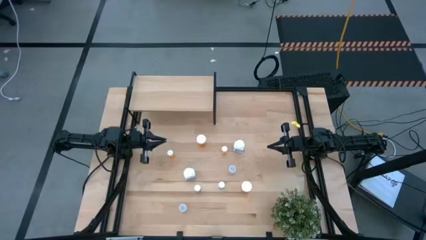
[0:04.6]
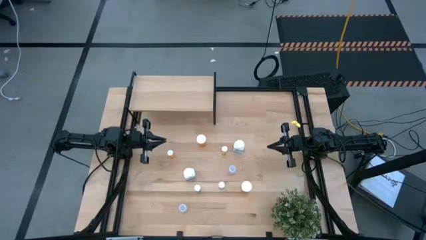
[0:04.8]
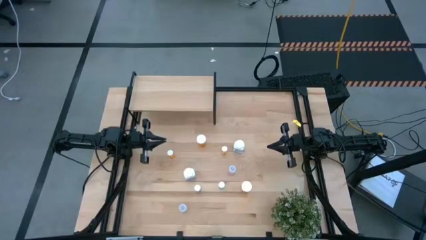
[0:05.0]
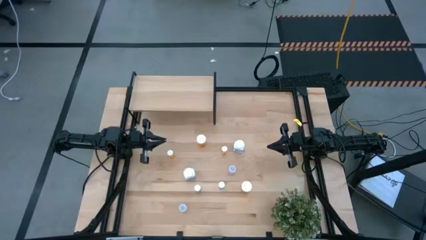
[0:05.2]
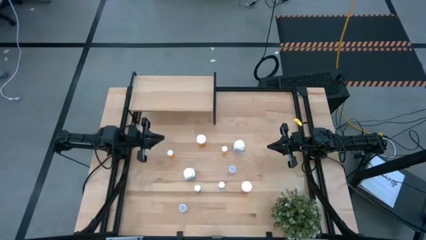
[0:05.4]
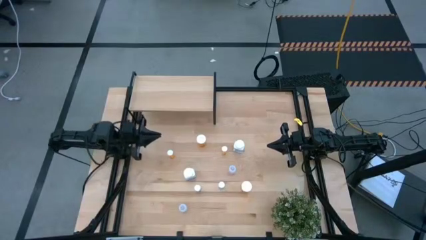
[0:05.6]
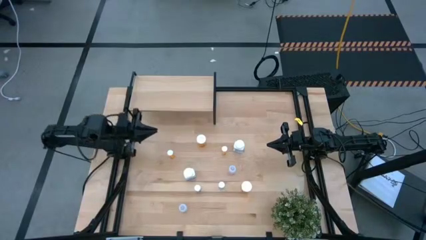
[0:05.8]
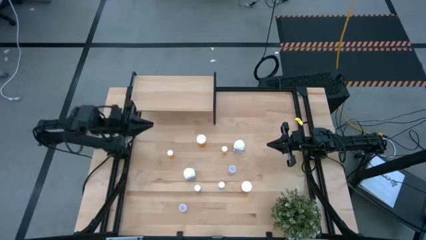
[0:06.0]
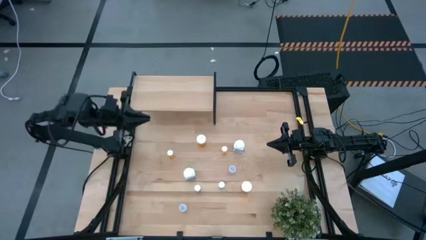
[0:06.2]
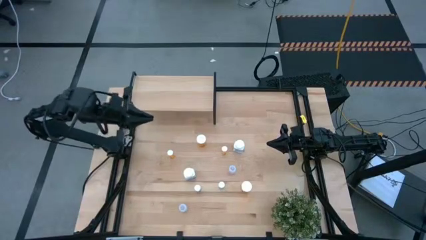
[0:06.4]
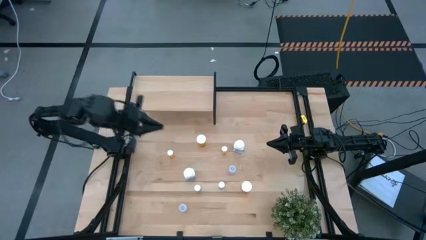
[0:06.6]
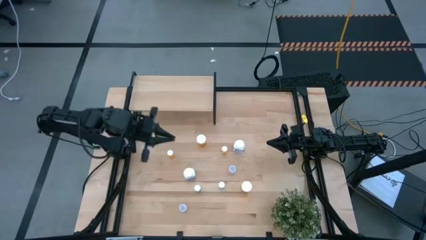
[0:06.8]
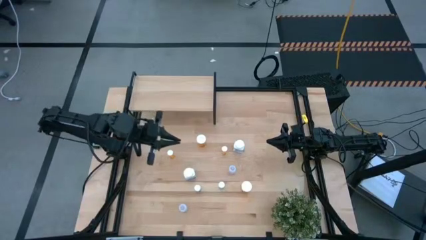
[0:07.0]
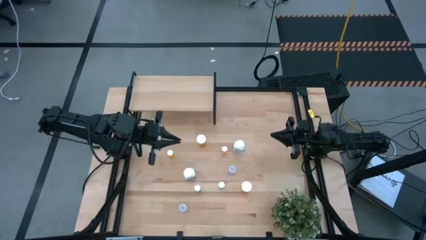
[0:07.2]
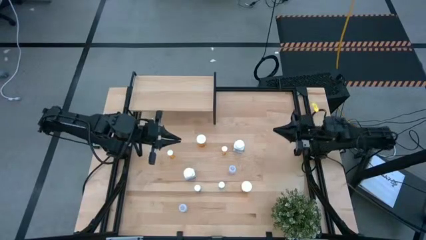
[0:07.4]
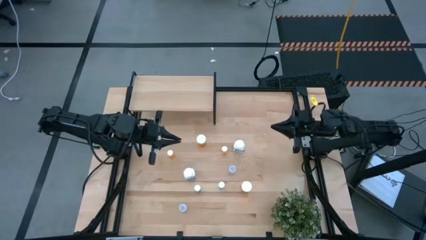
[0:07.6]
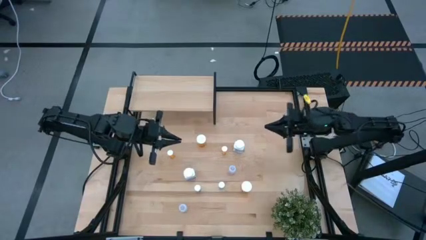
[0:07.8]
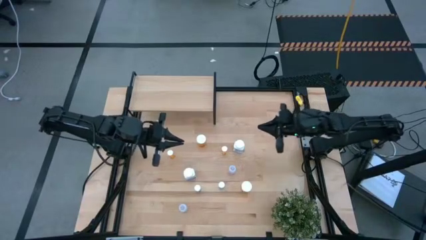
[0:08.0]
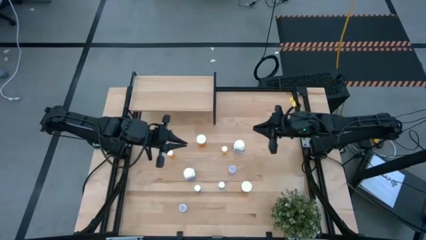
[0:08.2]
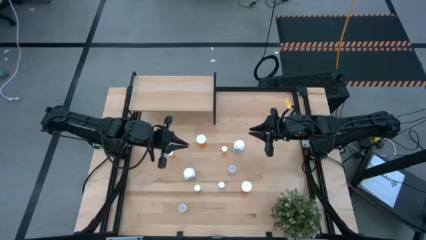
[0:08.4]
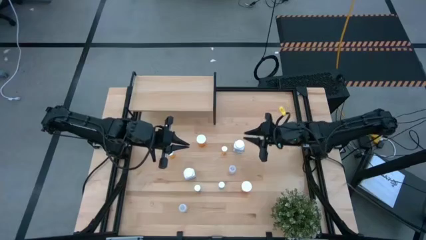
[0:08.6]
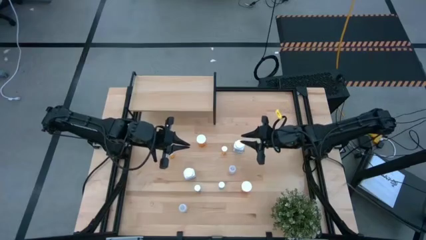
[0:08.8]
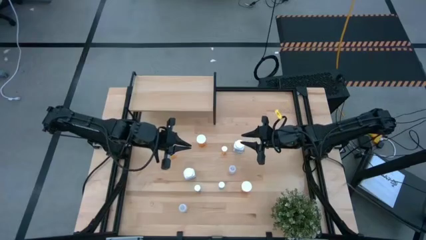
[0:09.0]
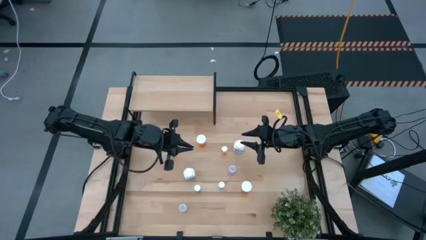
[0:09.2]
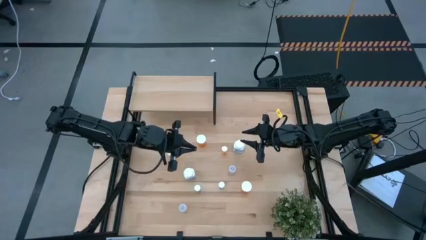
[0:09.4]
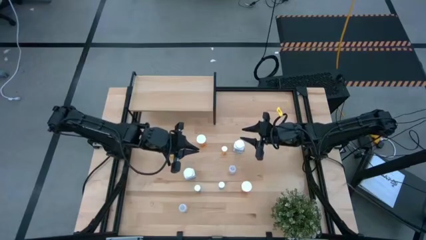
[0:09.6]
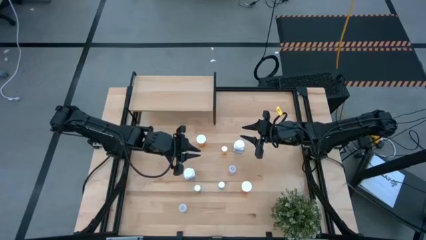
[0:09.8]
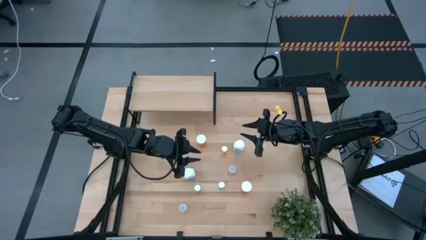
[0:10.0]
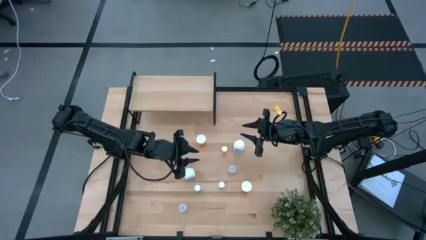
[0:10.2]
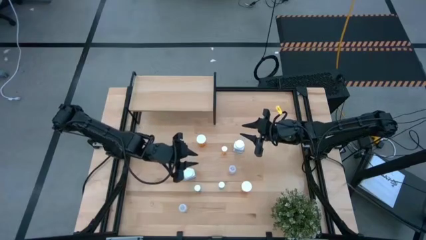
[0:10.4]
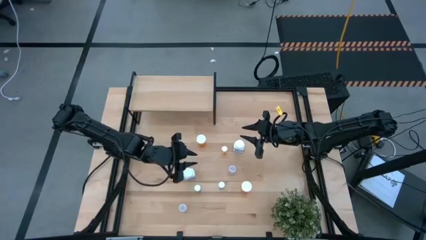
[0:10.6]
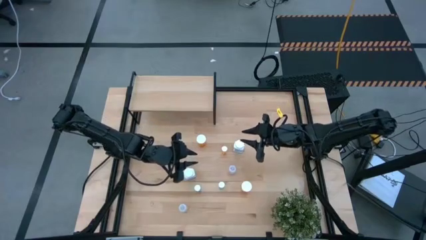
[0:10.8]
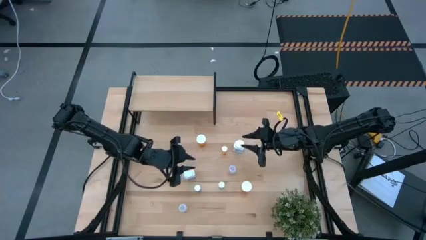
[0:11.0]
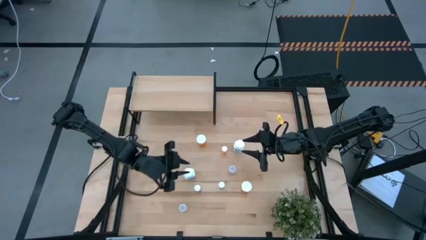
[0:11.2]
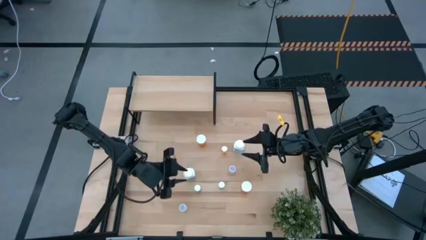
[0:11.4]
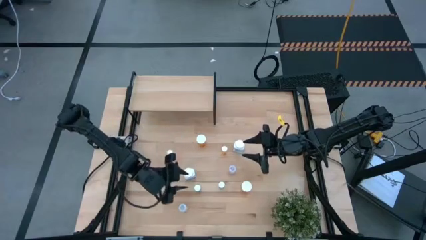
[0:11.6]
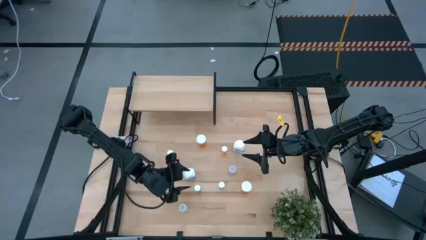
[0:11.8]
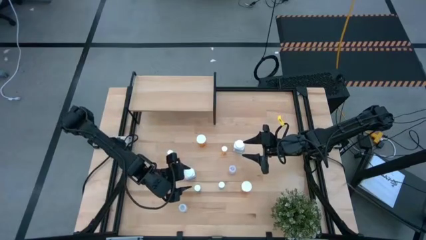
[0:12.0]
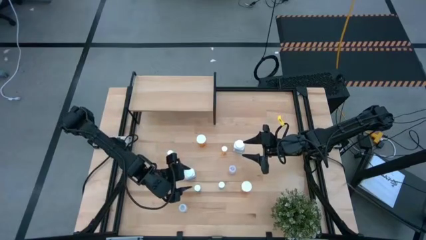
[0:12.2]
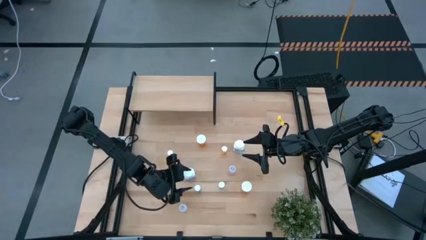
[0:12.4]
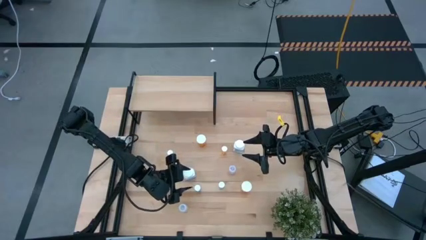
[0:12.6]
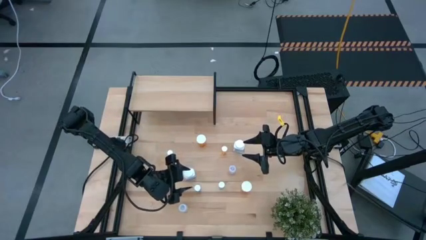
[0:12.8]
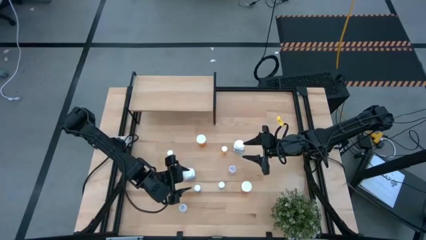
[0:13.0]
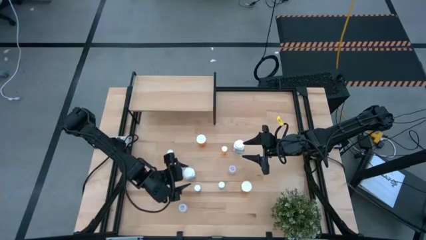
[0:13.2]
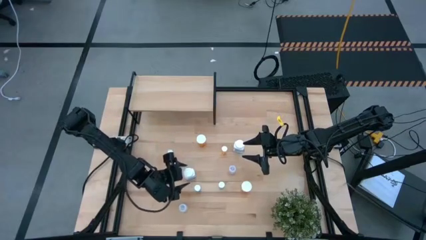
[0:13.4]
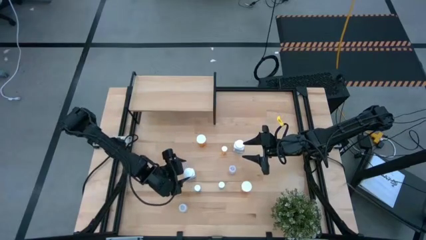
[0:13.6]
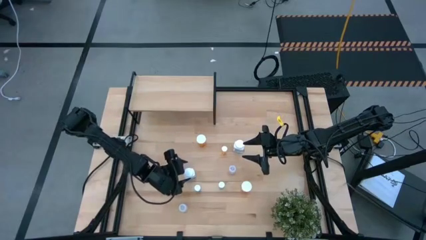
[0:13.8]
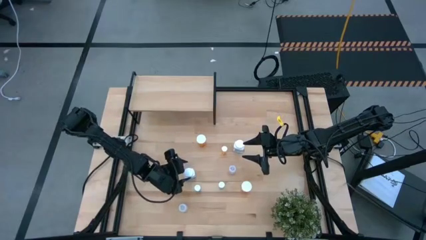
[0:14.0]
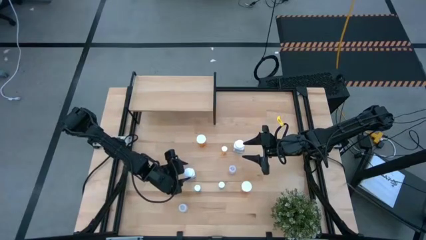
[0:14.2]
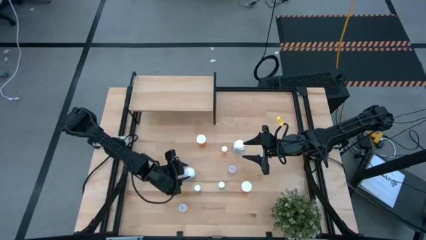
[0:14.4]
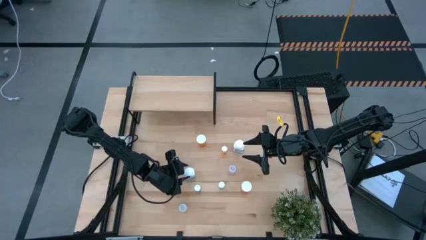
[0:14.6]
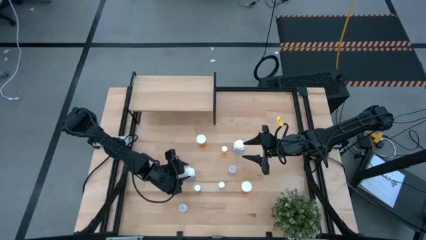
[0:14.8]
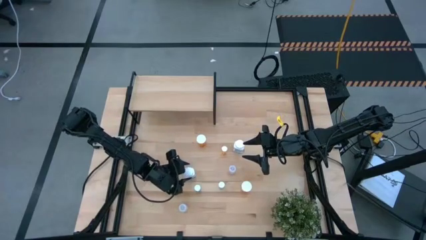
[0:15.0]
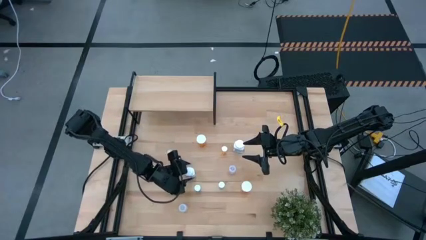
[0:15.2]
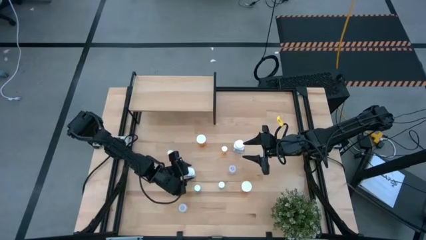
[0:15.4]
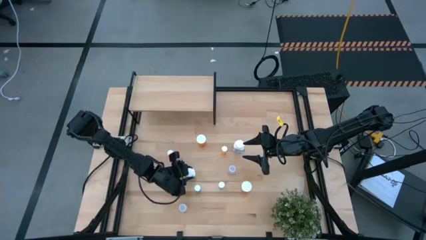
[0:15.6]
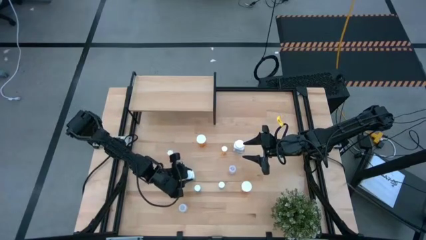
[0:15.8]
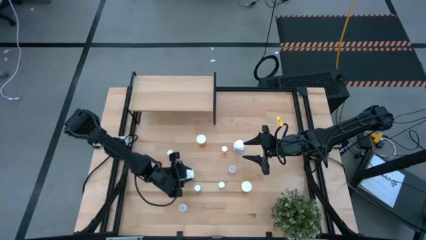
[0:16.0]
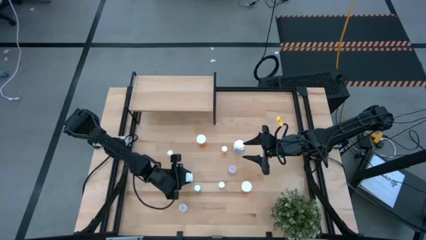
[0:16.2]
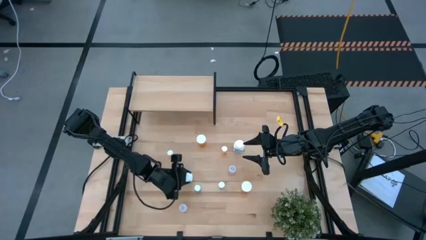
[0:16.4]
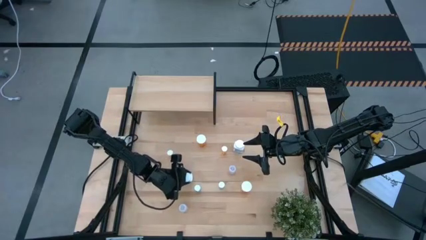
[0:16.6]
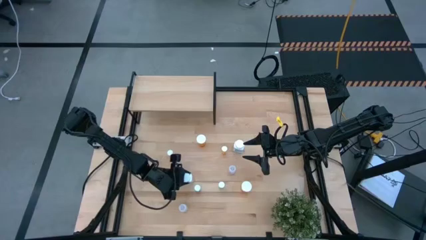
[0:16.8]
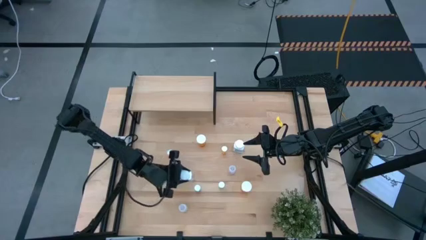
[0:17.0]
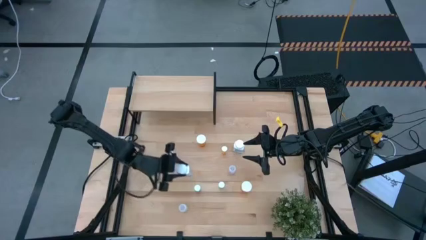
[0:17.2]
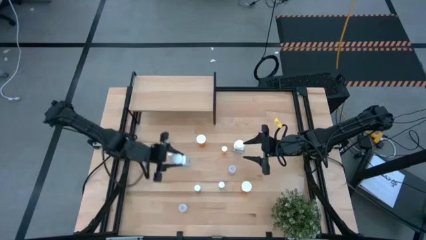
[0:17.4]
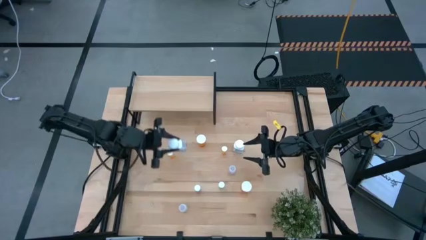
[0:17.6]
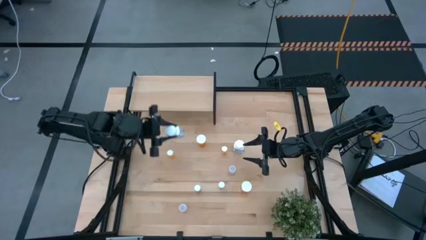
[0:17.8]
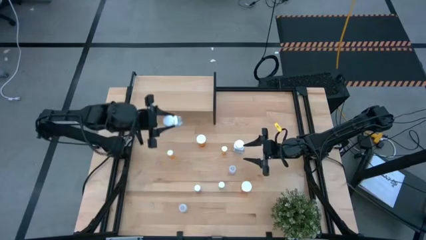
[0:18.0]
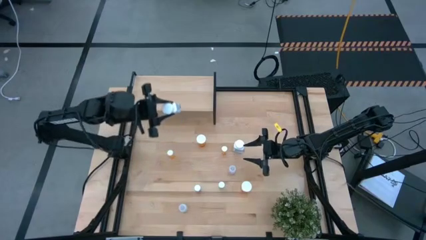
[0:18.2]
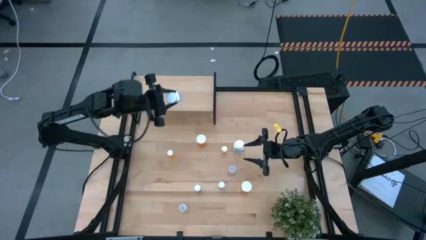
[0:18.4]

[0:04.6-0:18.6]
Task: Pick and place medicine bottles onto shelf by color
Put the bottom white pill bottle on the shelf
